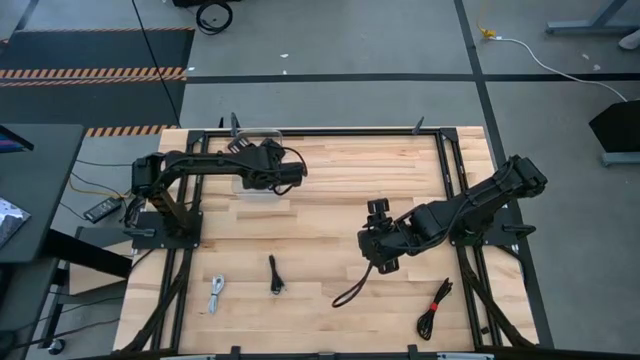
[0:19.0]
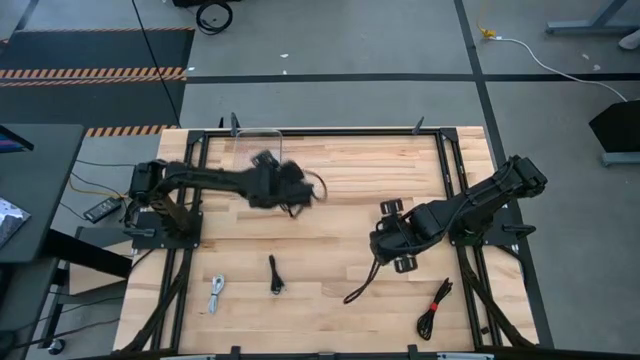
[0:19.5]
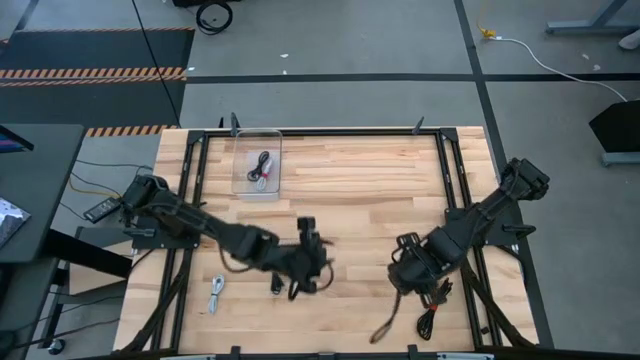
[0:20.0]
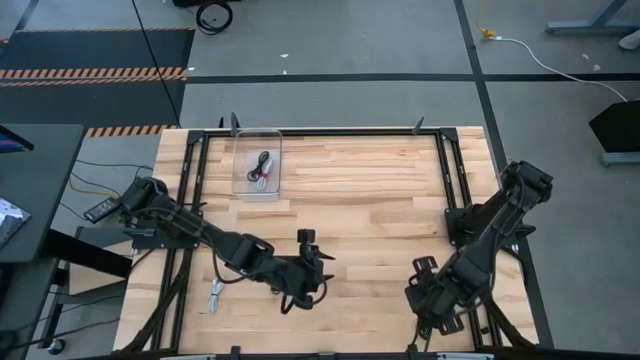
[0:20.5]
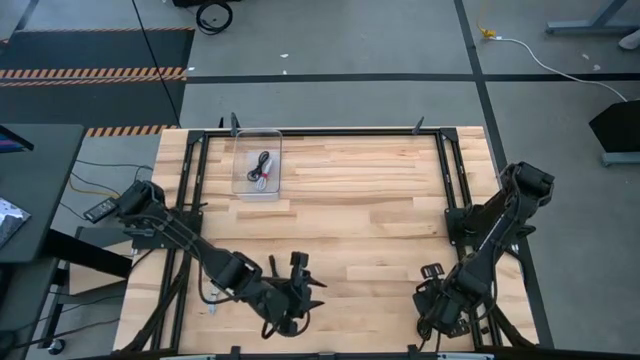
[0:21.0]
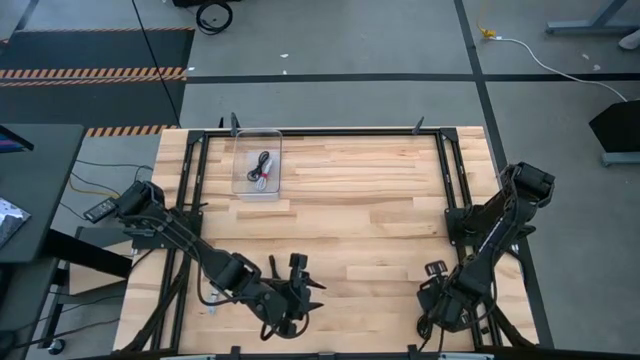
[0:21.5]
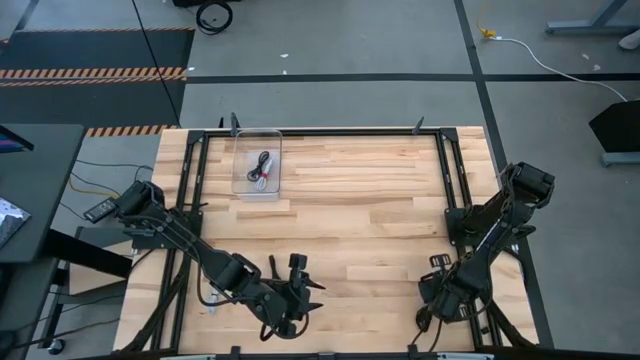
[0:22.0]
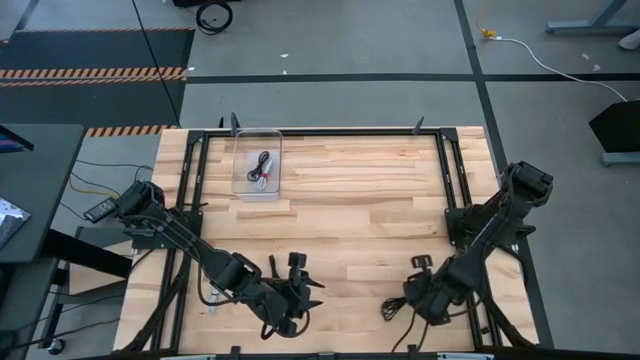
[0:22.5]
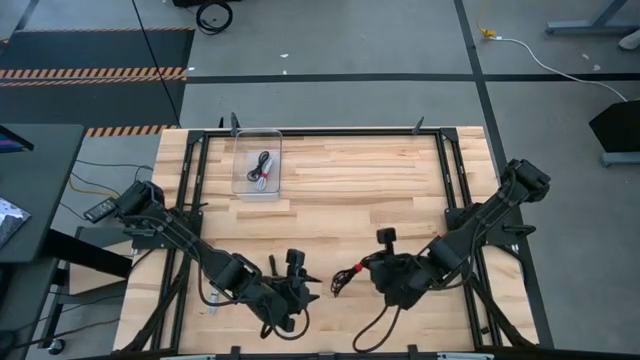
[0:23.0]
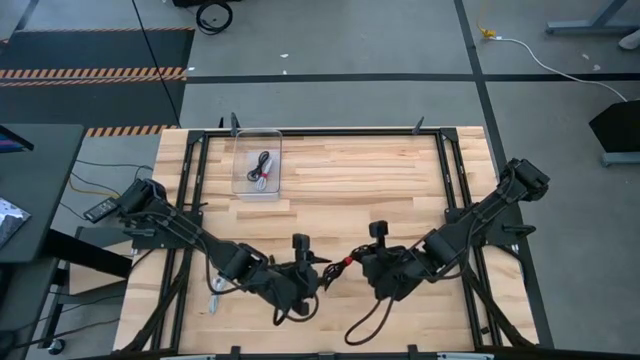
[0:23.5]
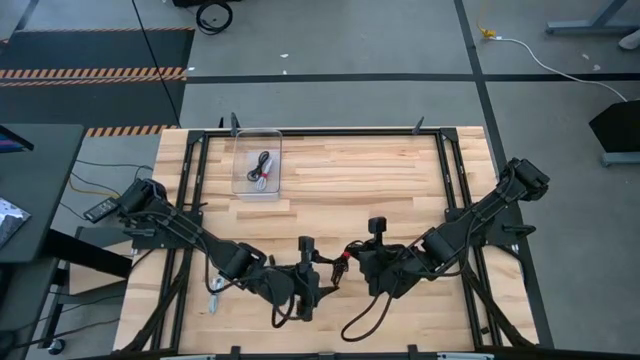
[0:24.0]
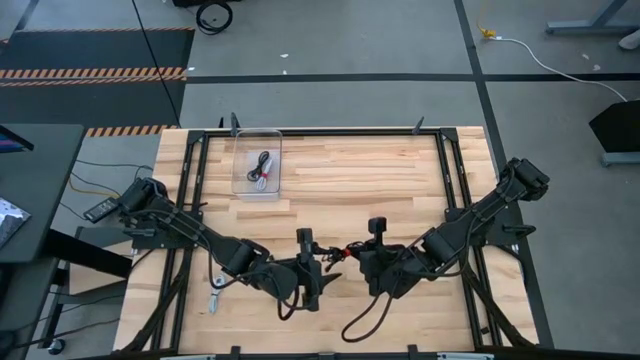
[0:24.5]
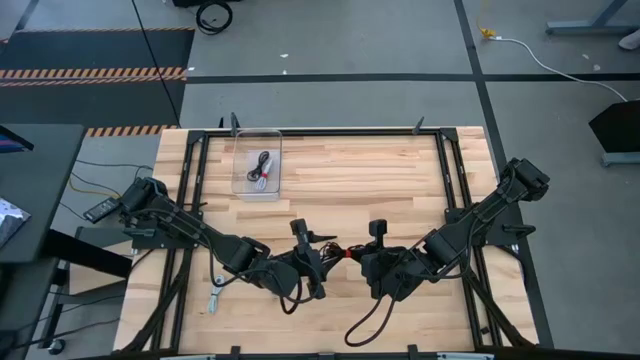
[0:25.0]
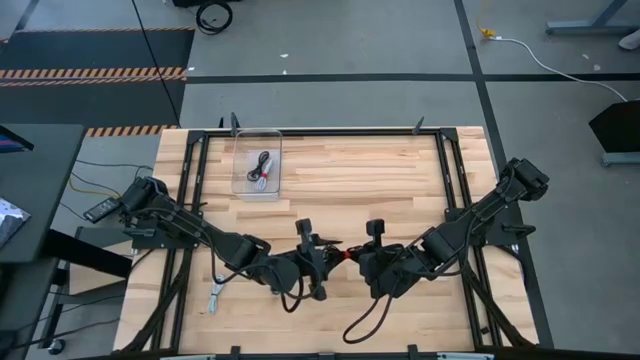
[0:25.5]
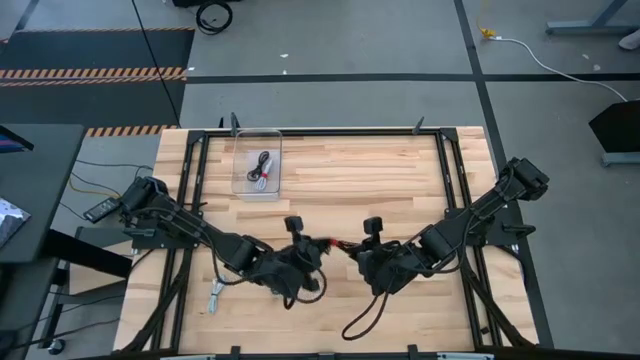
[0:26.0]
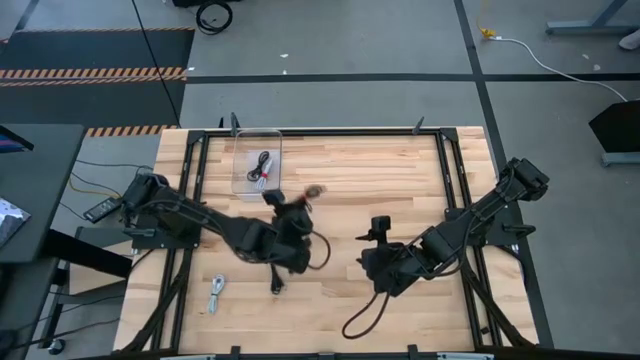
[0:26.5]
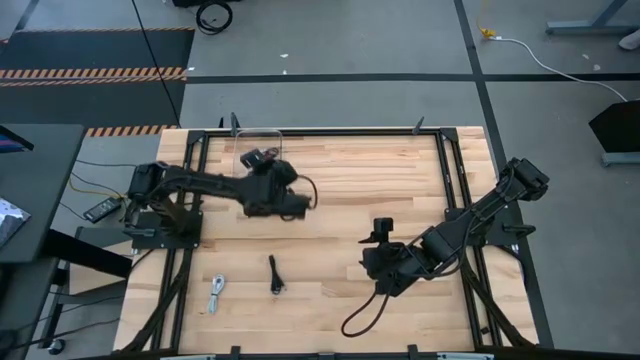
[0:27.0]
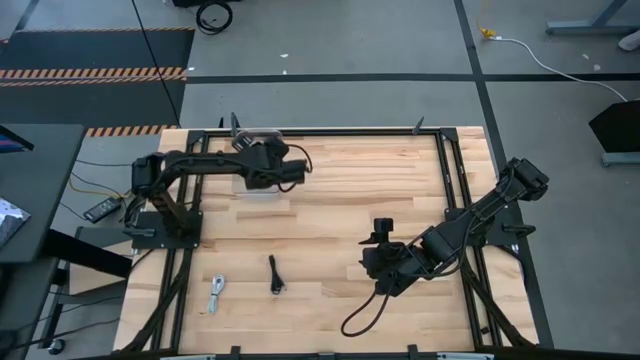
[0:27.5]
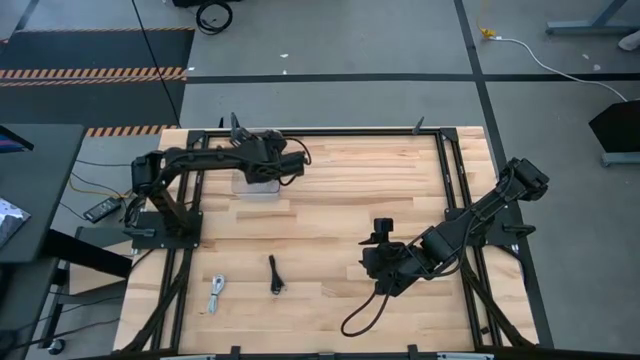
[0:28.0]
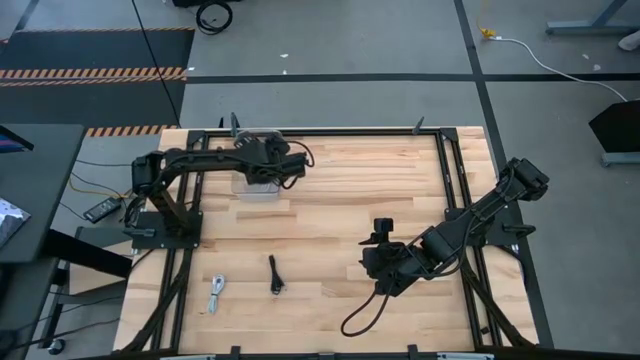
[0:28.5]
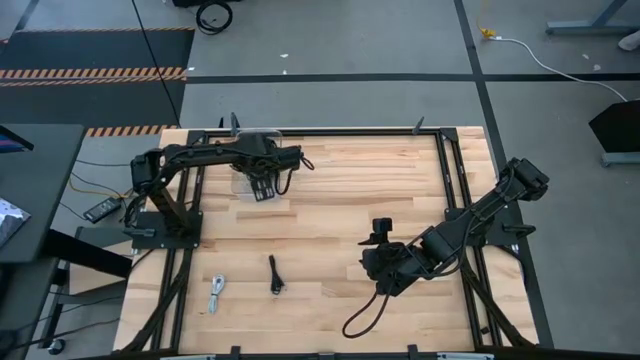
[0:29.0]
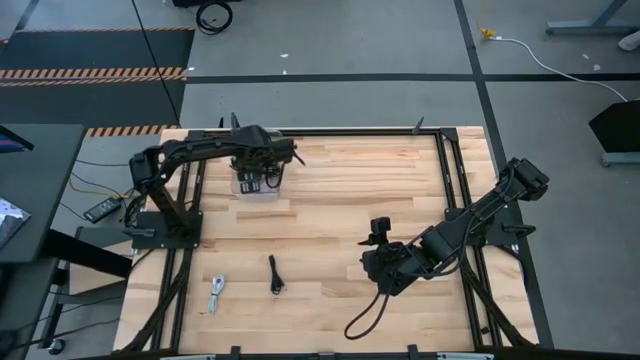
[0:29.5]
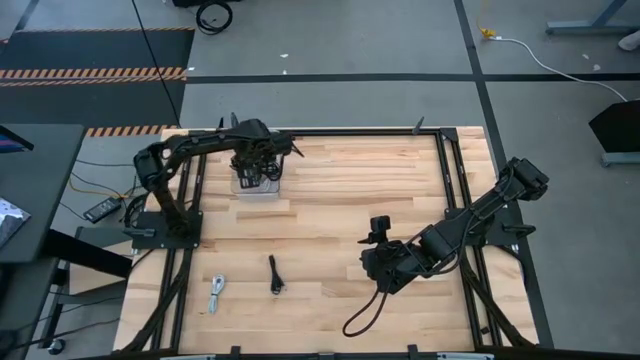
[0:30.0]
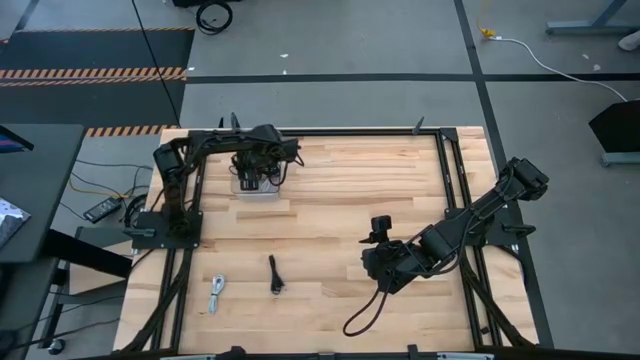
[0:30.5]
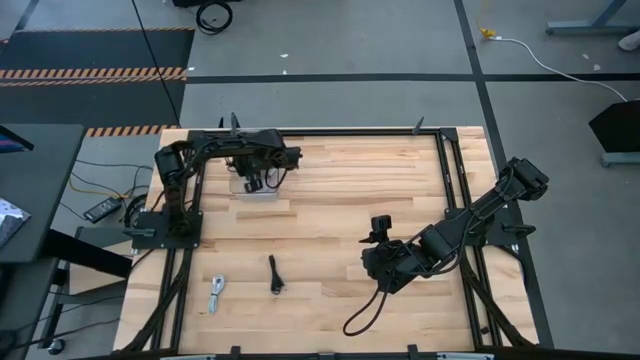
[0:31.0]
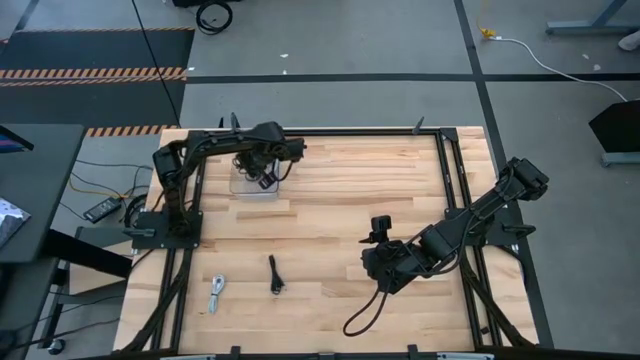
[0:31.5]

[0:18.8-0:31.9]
Task: Pick and place USB-C Cables
Put the bottom black charger cable into the transparent bin

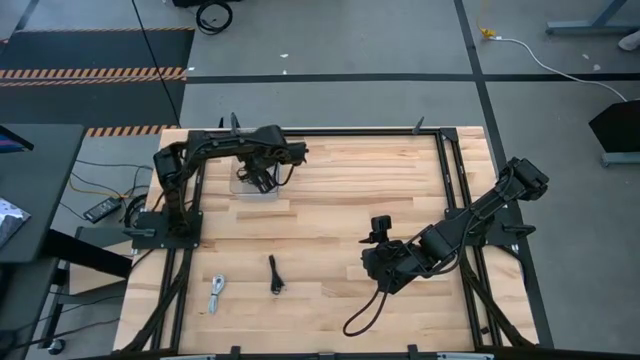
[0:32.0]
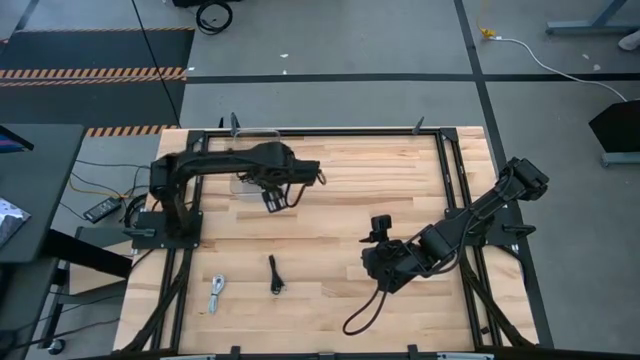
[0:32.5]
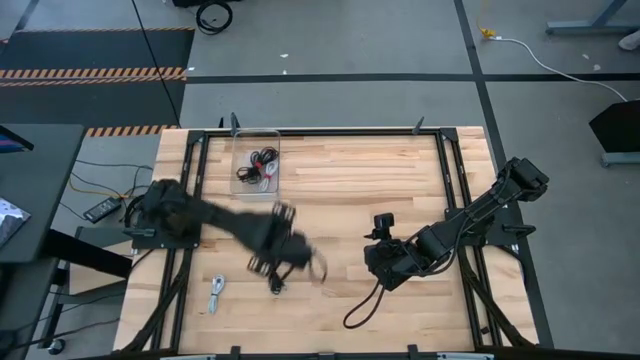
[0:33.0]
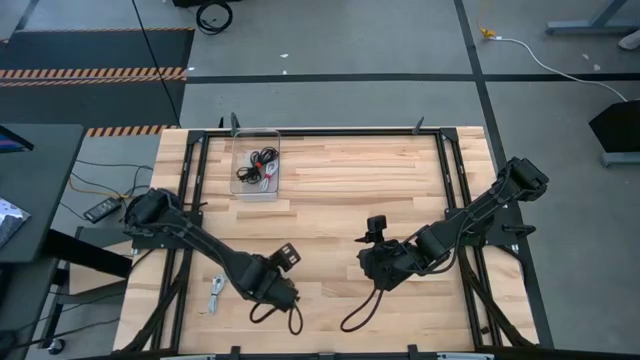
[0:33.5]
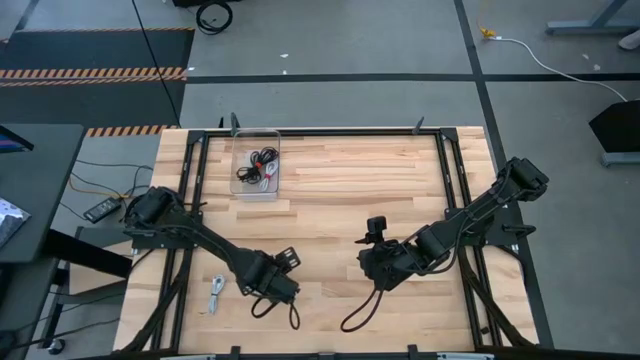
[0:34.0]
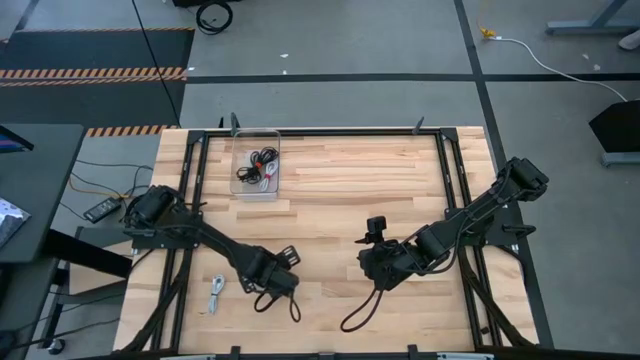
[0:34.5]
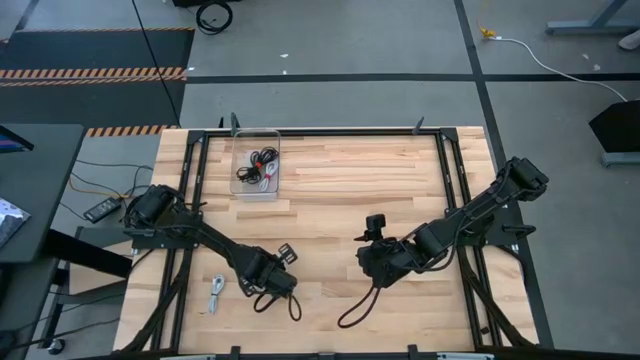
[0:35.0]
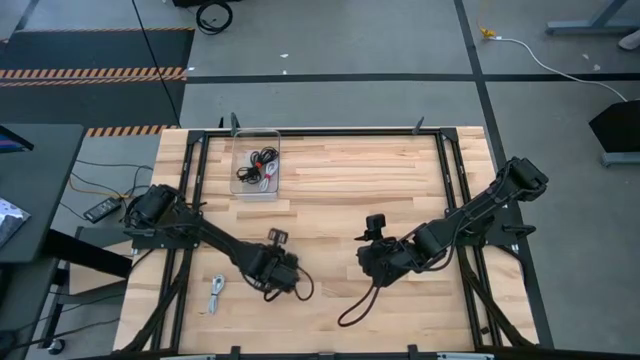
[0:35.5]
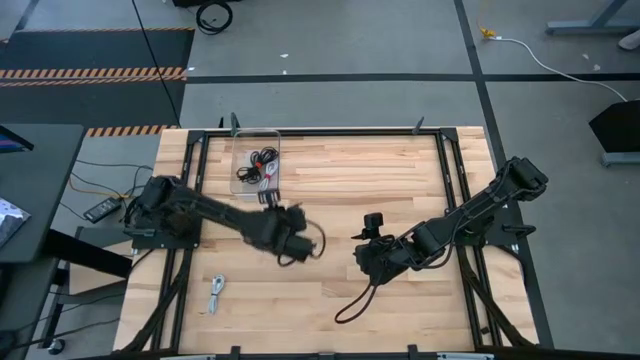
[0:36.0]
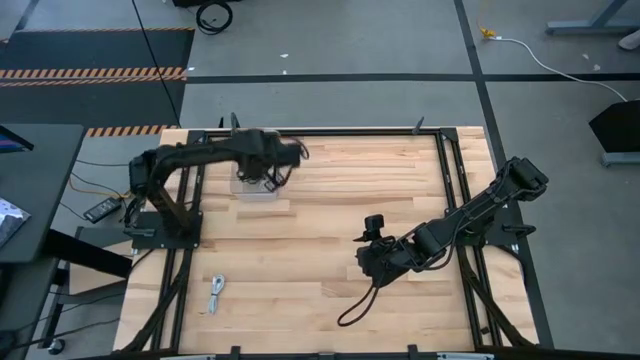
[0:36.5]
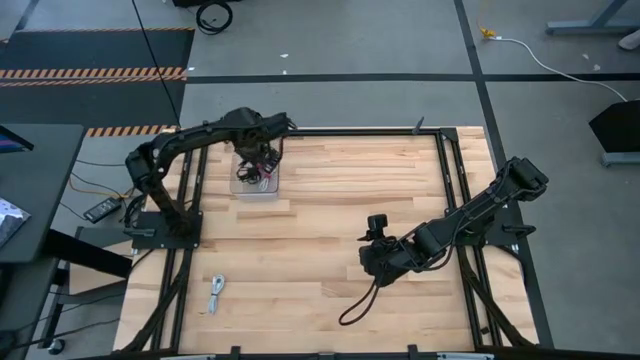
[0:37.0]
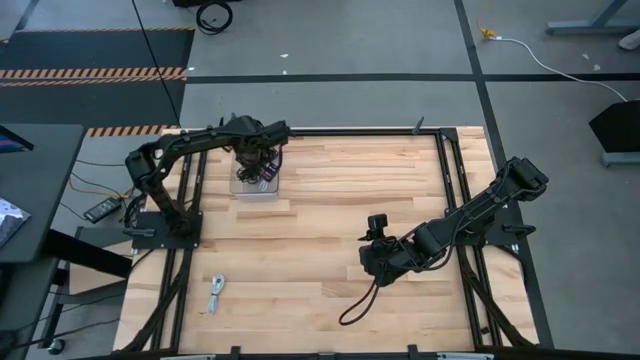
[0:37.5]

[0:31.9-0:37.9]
Put the black charger cable into the transparent bin

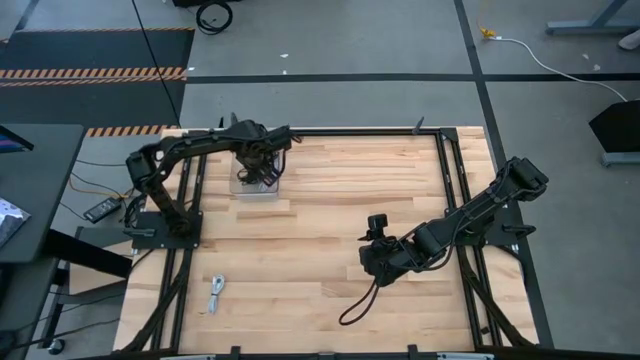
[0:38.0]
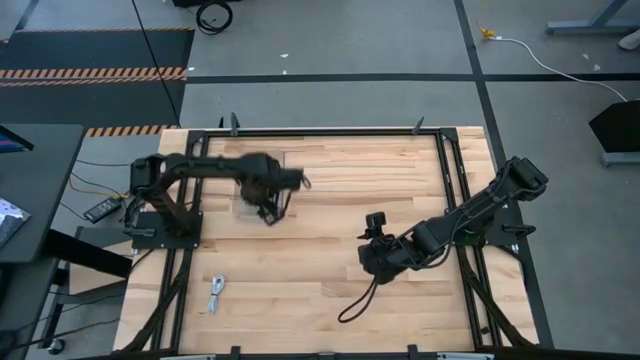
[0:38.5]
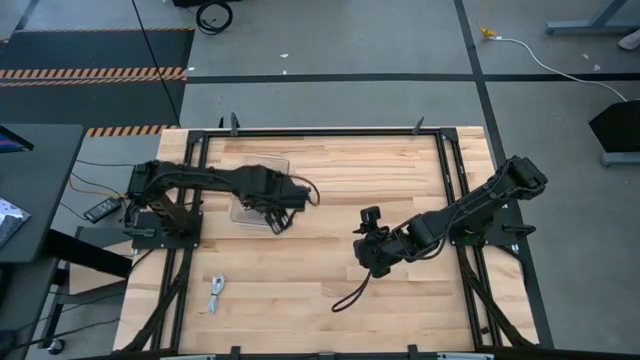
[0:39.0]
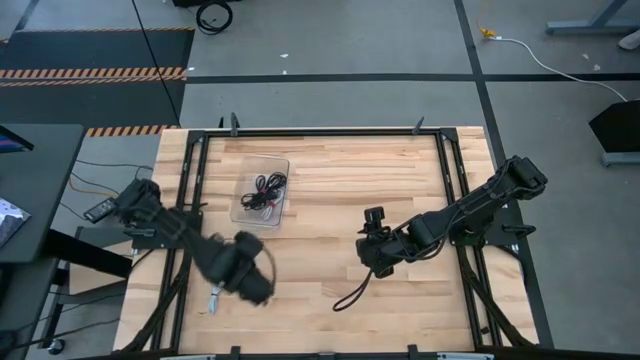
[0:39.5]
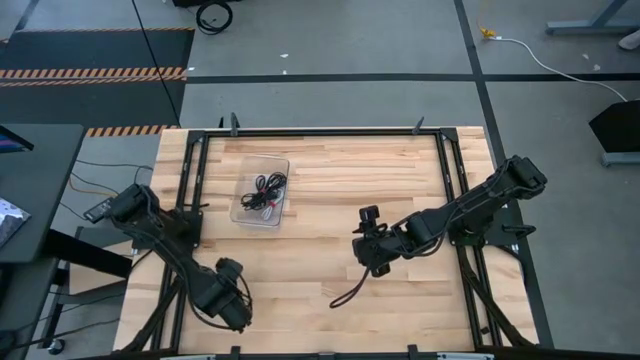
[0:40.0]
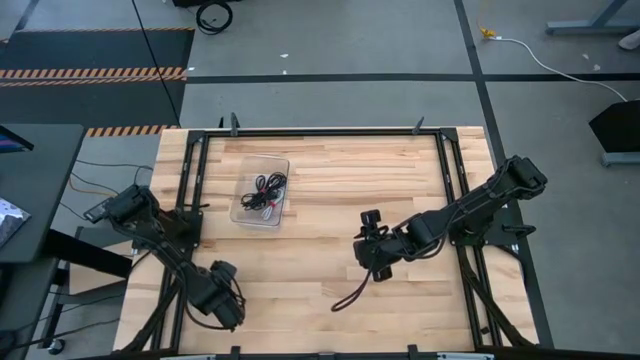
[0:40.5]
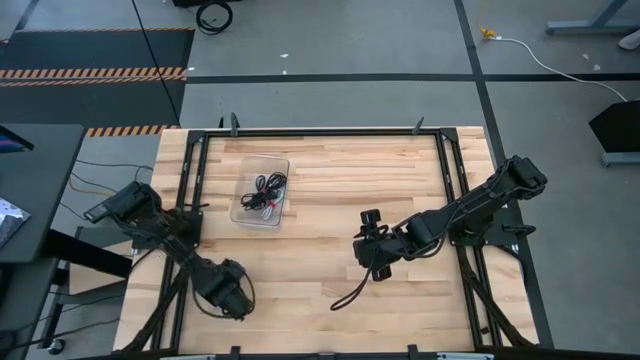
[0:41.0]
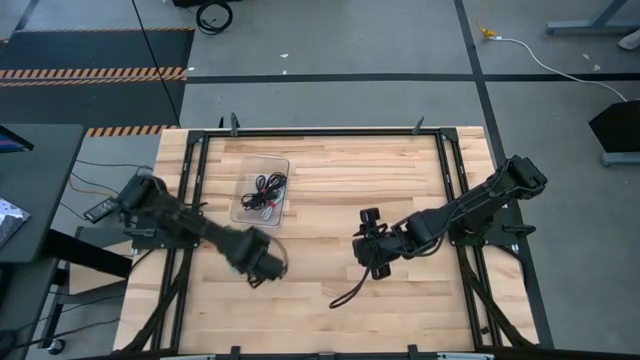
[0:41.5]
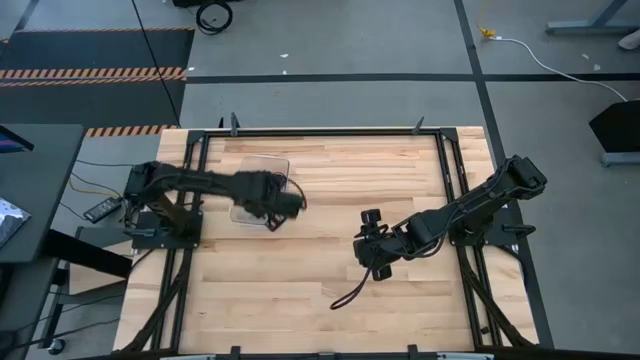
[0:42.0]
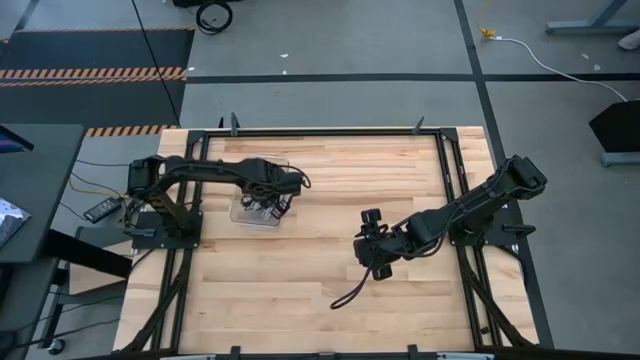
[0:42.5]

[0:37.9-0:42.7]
Put the white charger cable into the transparent bin
